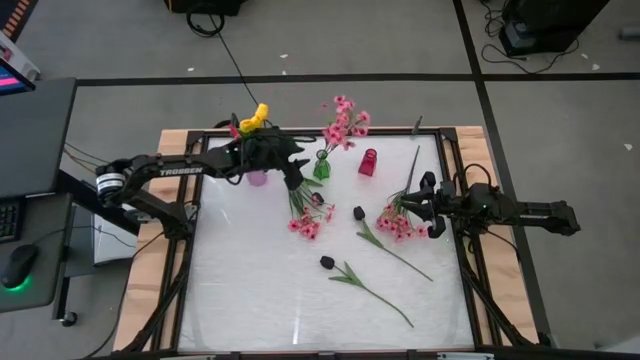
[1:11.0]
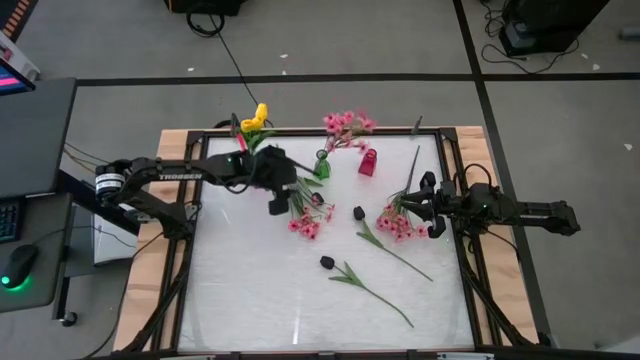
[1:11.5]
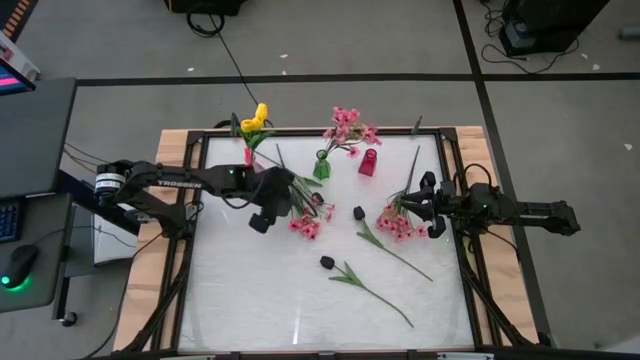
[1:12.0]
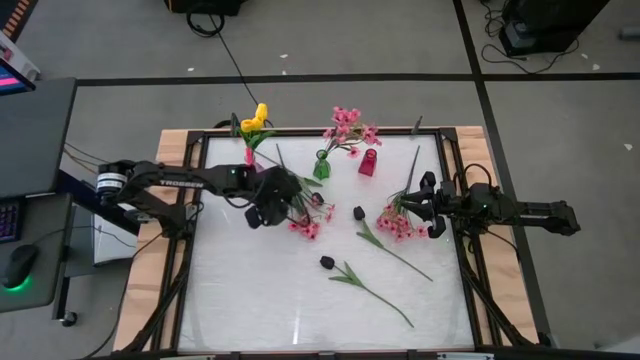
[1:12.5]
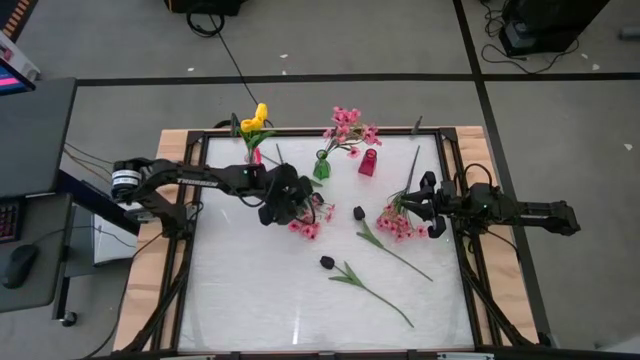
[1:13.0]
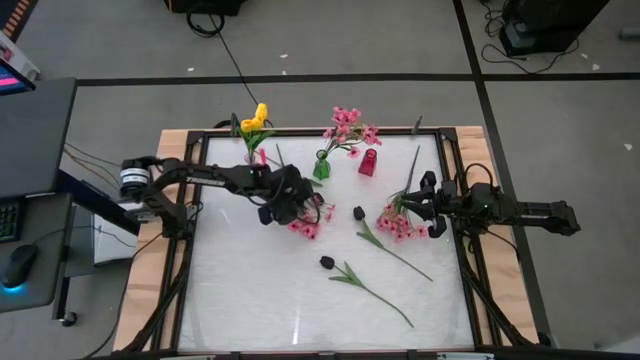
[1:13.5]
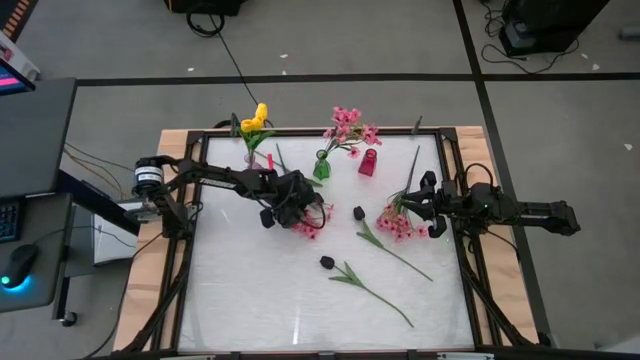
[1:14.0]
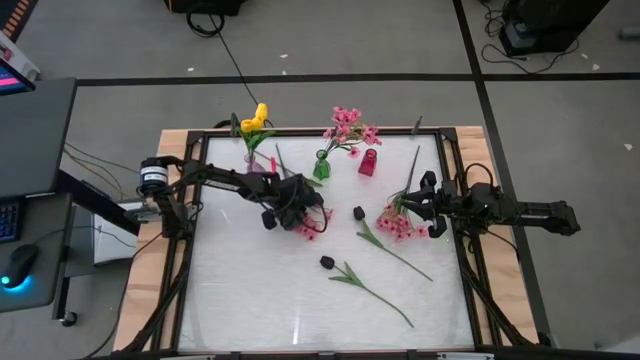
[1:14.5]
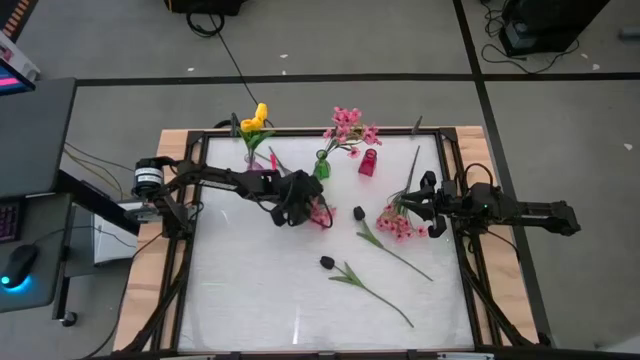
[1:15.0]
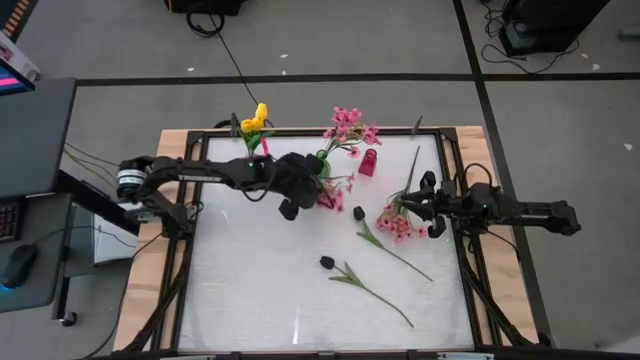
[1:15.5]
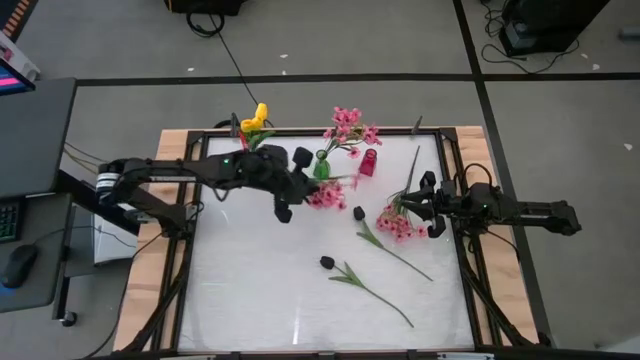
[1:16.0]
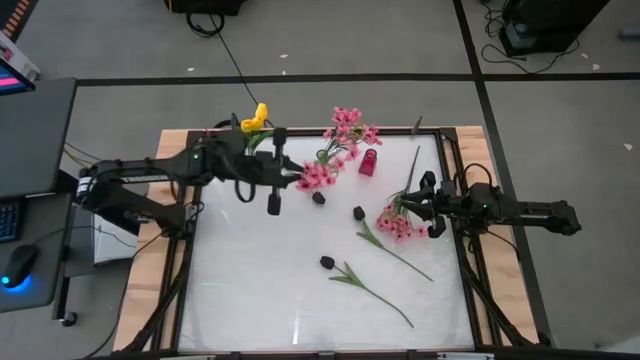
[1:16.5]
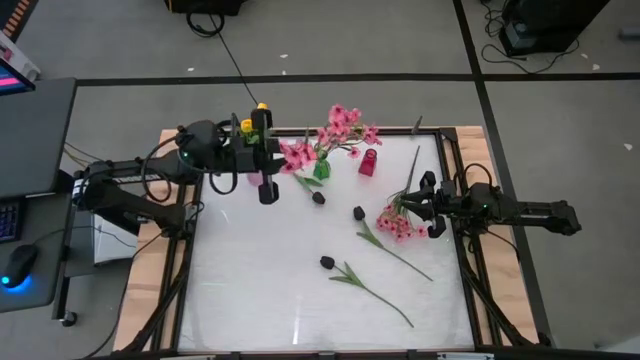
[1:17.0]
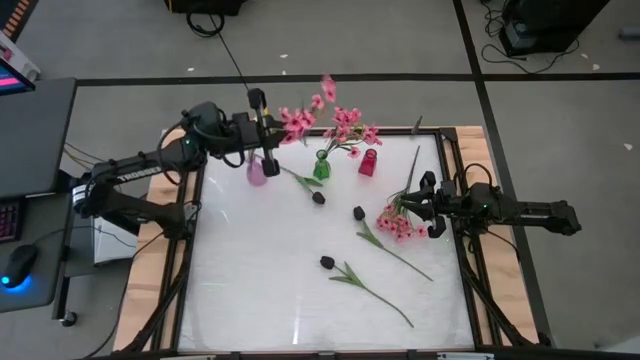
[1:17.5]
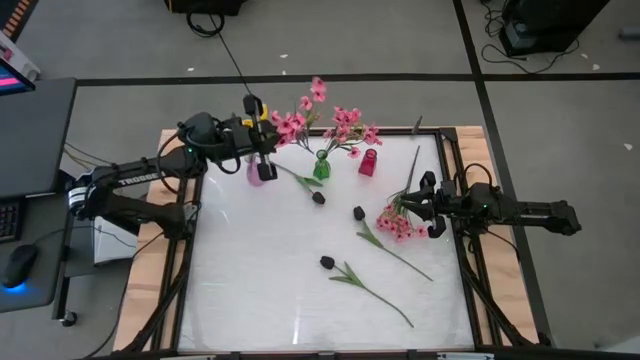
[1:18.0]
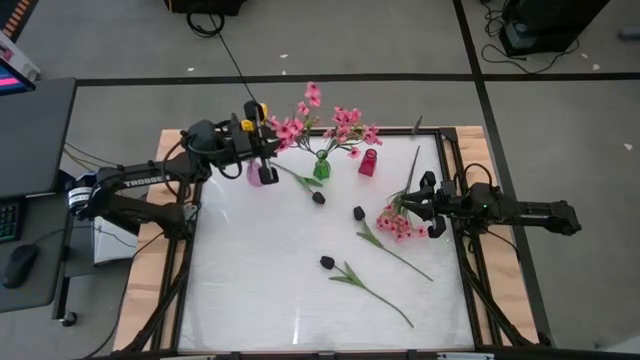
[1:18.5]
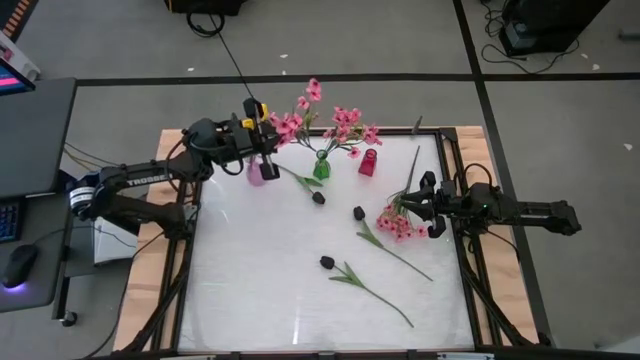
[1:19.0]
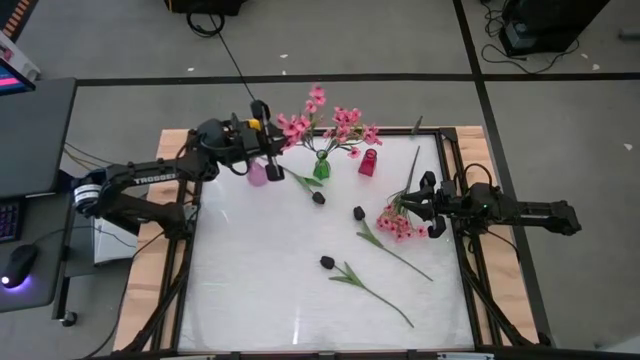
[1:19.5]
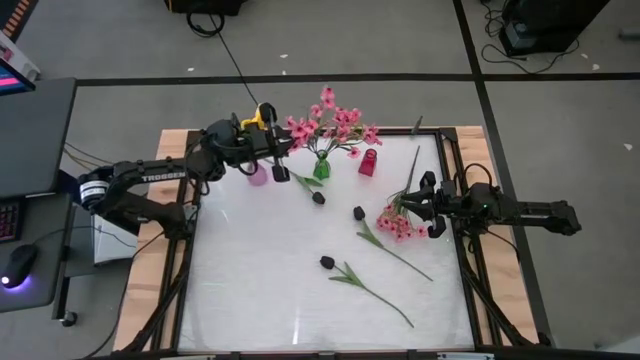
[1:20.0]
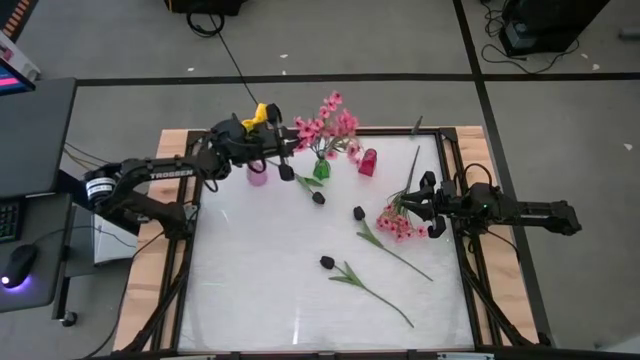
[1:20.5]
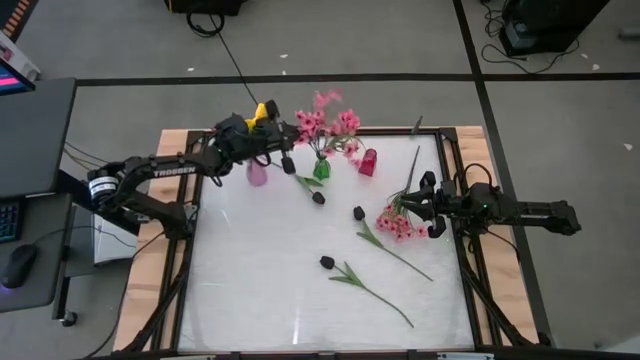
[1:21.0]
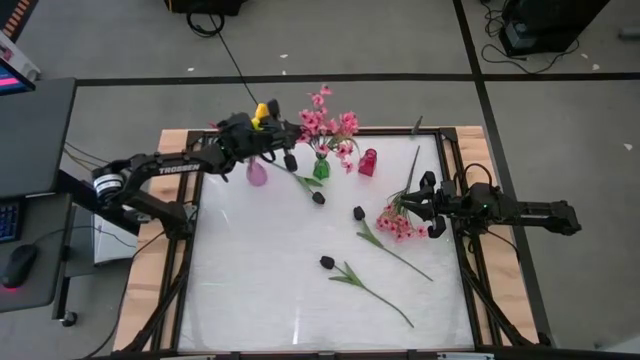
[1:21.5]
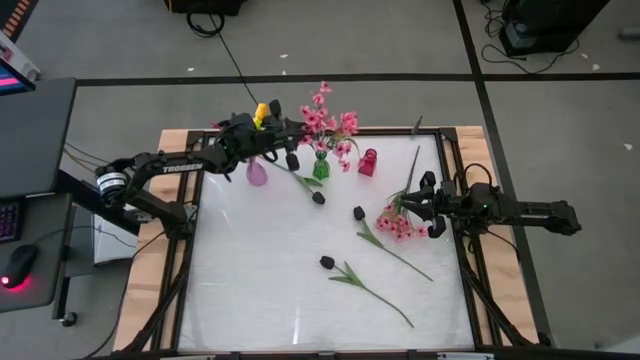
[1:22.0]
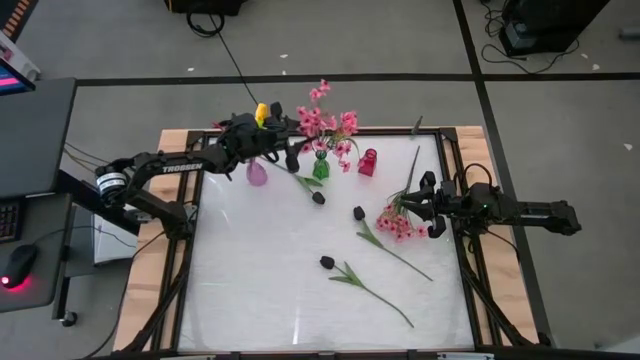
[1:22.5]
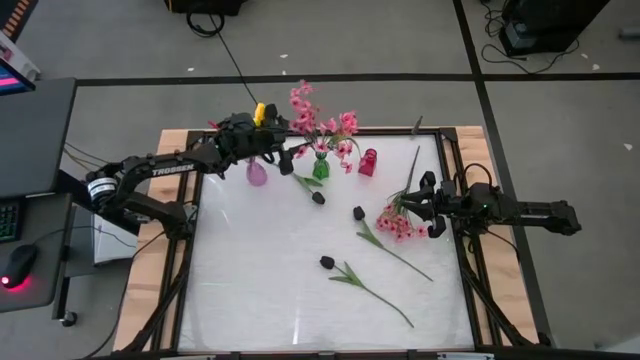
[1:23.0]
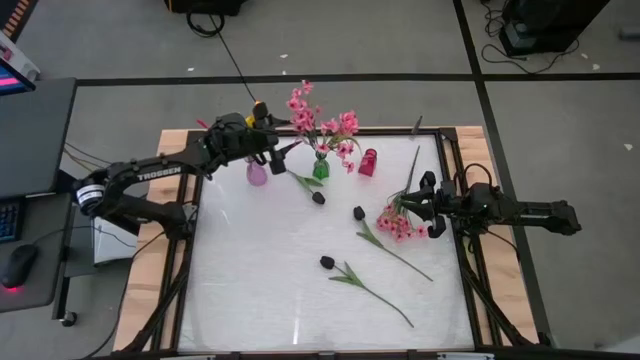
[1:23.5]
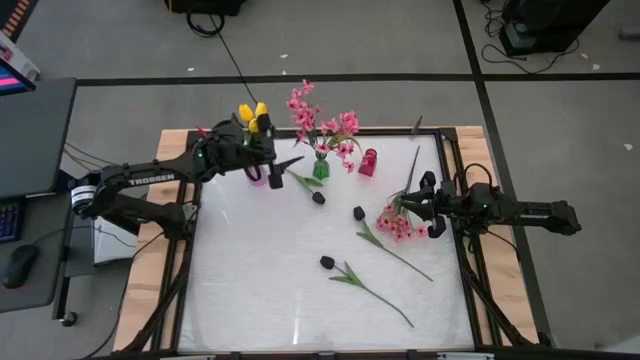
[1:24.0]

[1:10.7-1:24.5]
Task: Sort flowers into vase by color
Put the left pink flower into the green vase

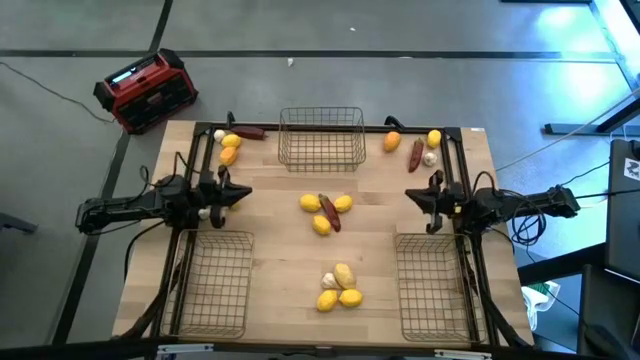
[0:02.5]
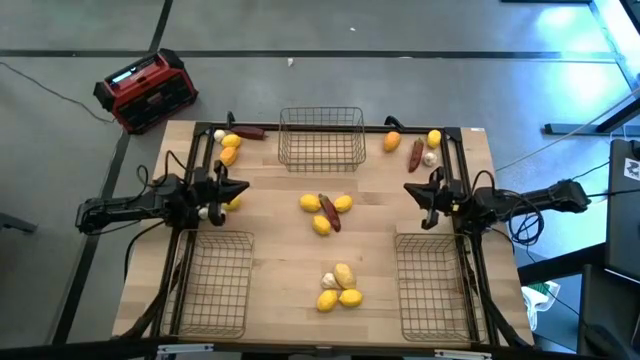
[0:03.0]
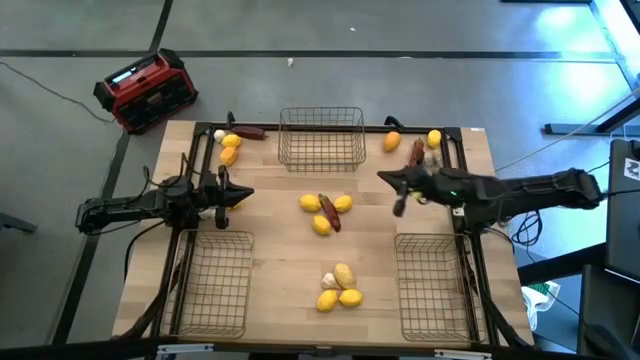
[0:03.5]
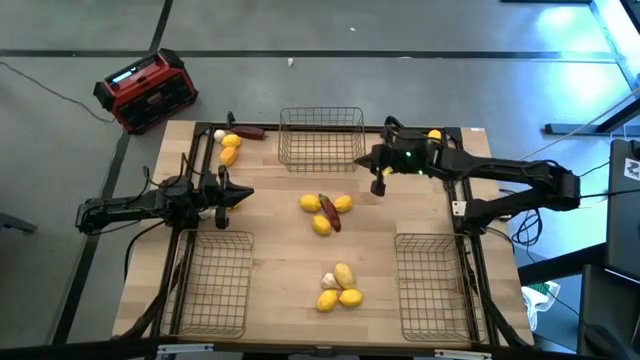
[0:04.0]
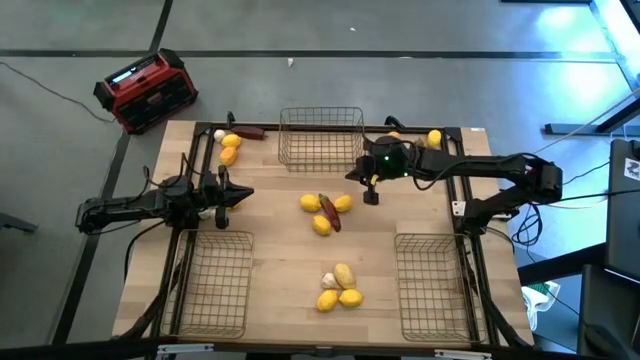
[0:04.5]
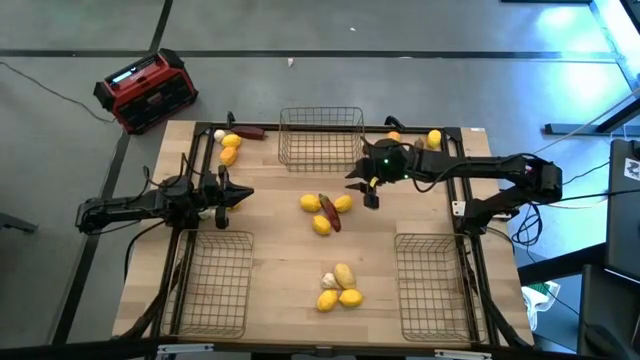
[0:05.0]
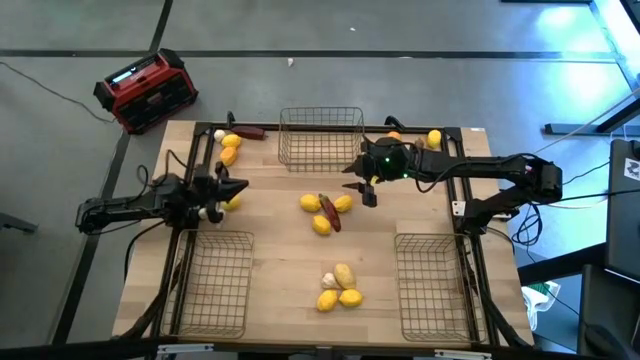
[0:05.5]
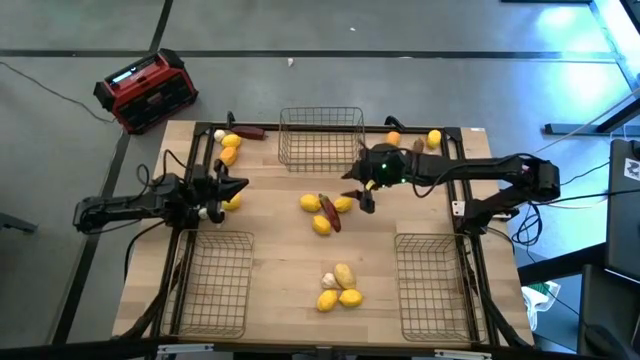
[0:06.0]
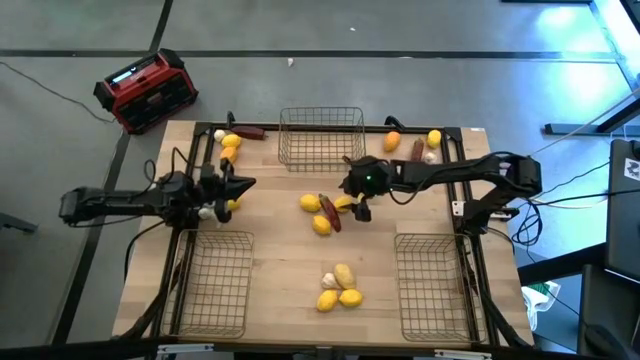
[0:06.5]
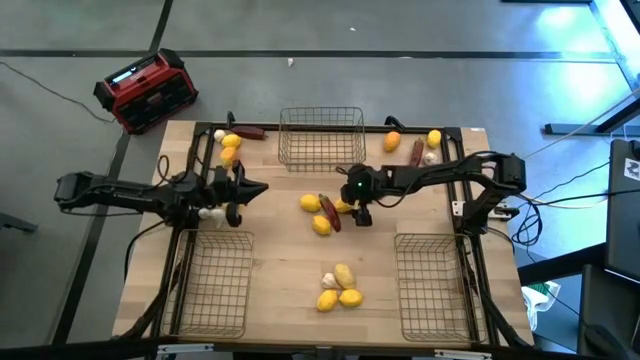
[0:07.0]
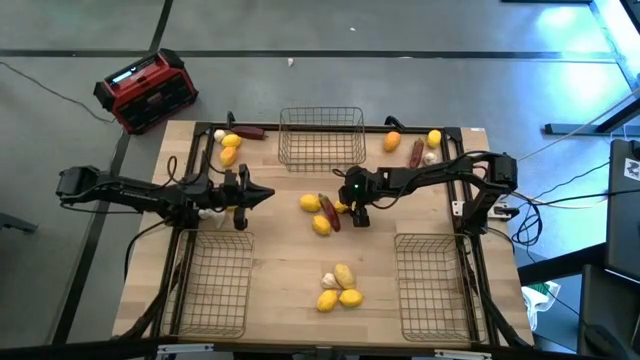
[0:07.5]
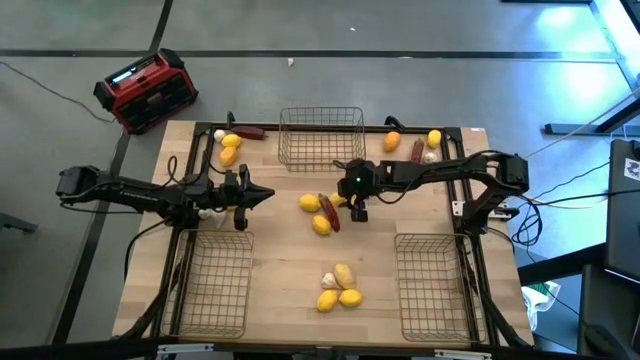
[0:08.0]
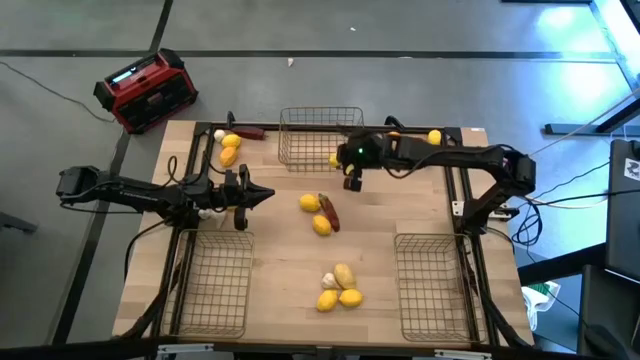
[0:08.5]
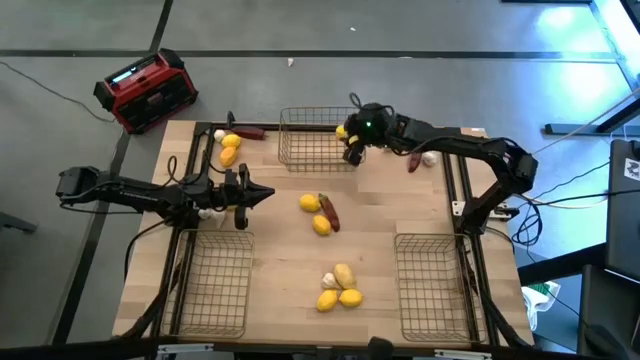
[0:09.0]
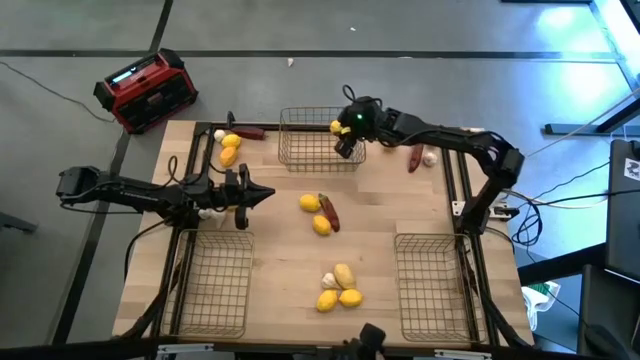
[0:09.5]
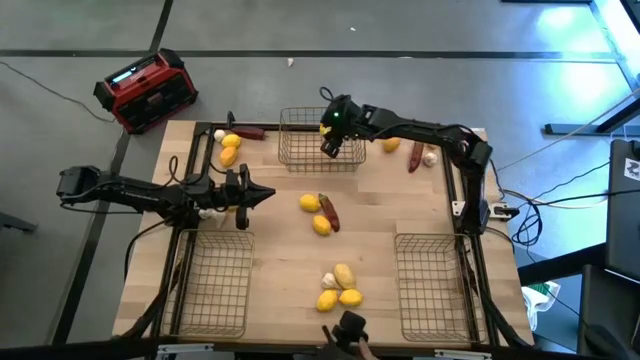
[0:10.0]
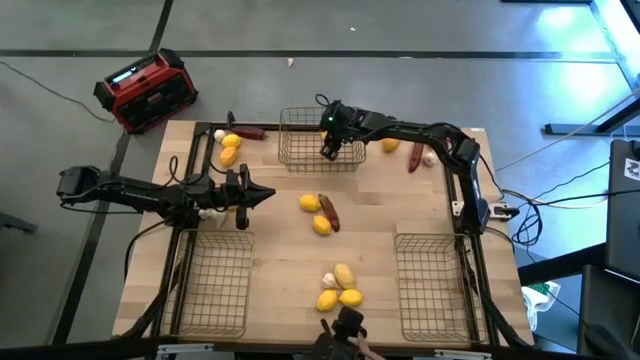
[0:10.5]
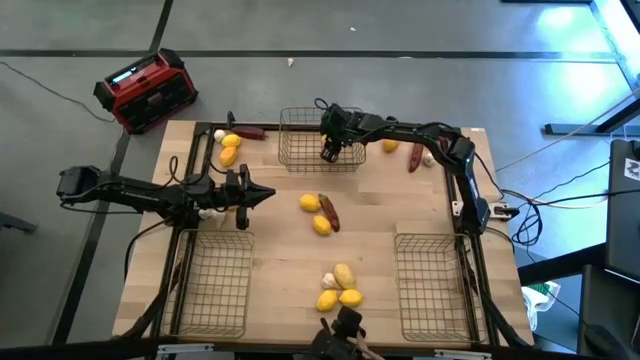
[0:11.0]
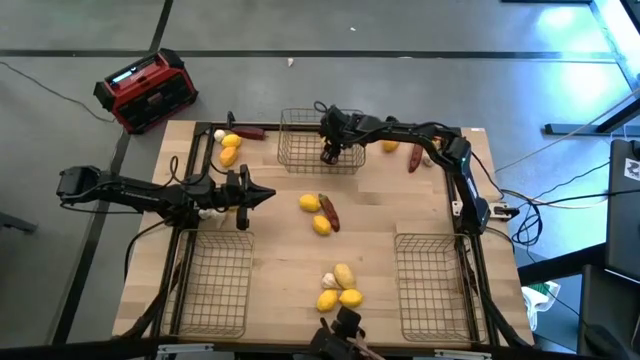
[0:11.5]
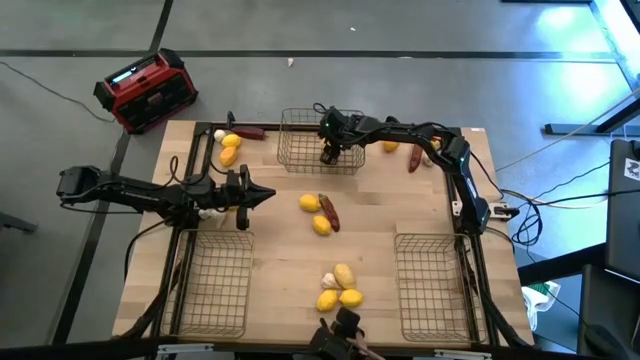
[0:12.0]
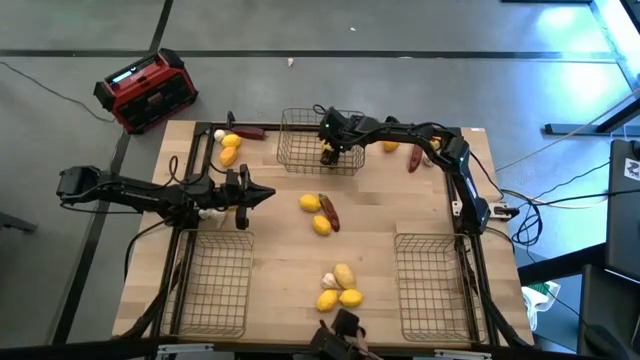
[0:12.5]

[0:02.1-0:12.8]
Task: Sort produce into baskets
Put the lemon into the top wire basket
